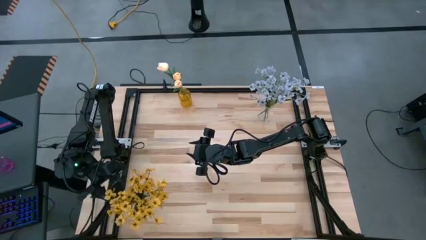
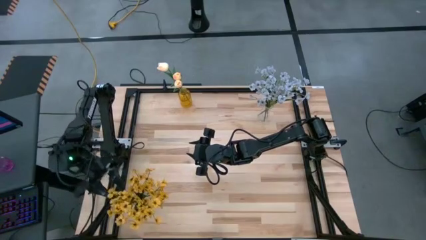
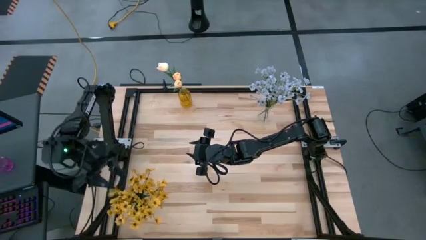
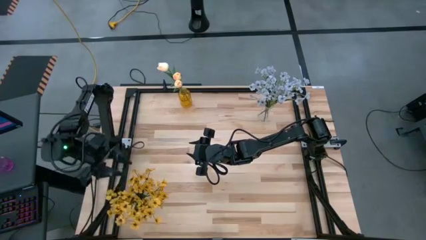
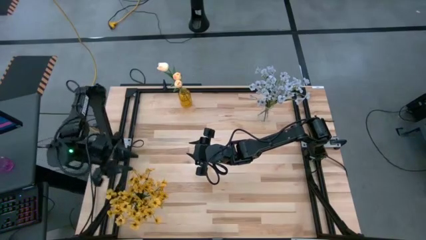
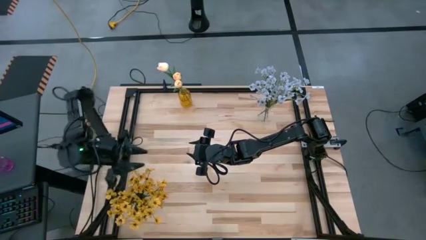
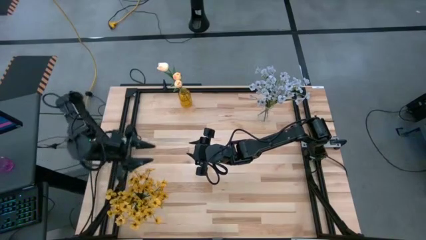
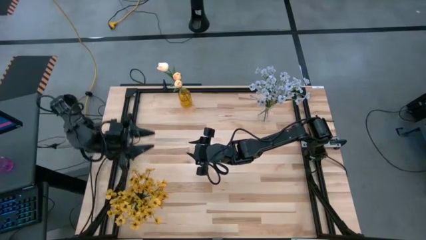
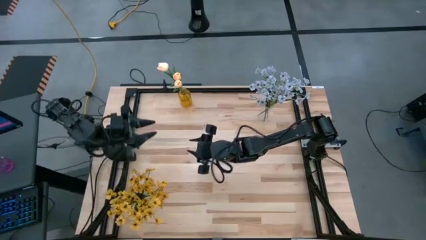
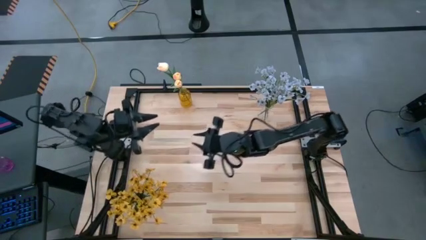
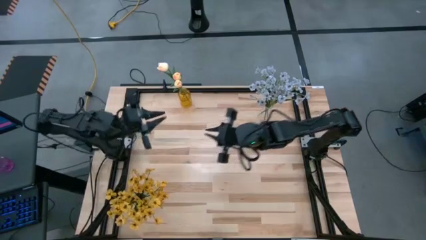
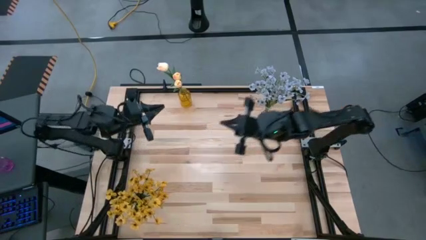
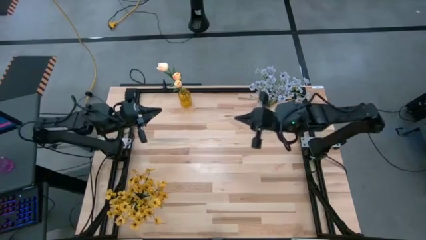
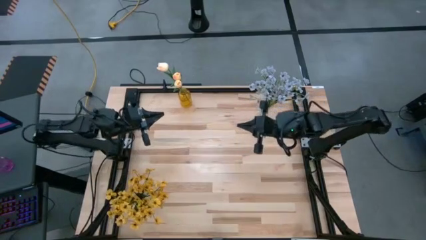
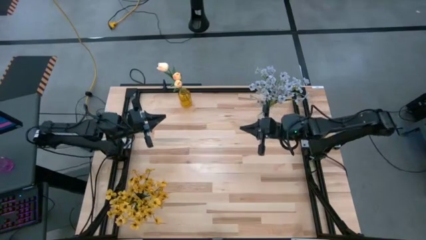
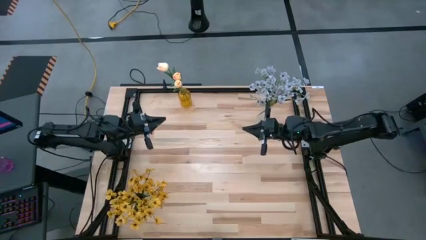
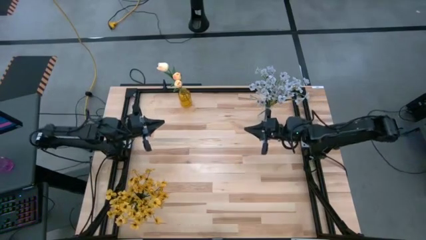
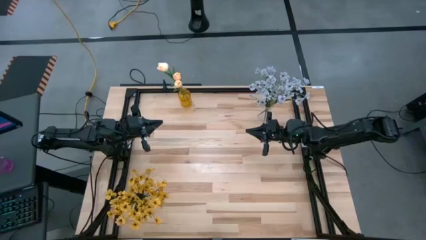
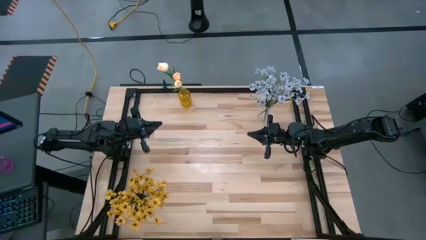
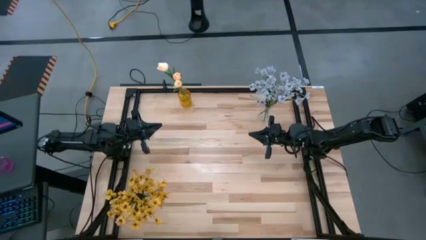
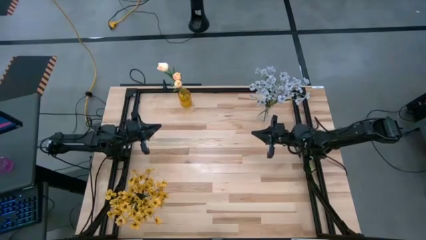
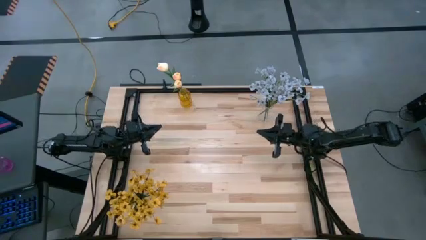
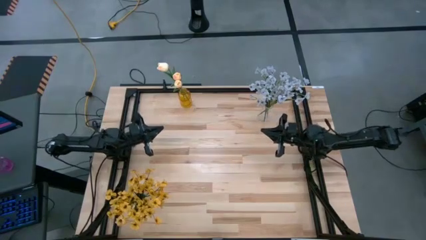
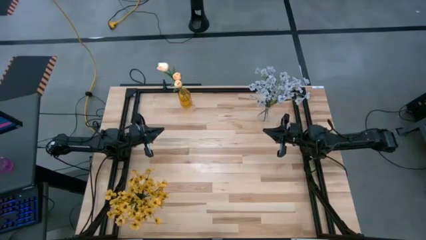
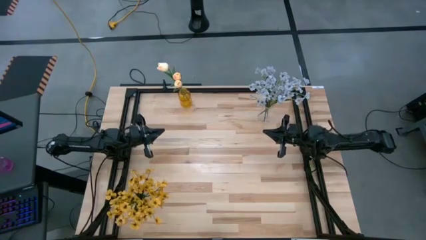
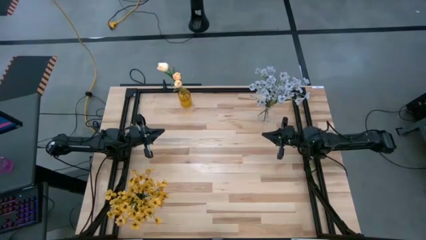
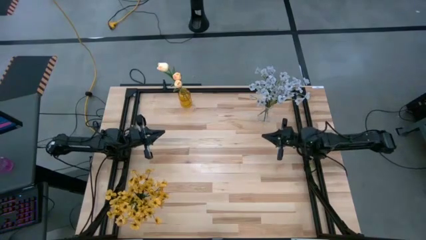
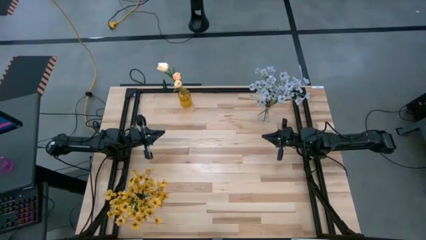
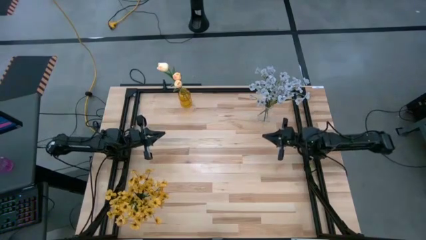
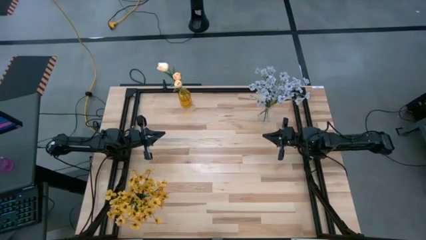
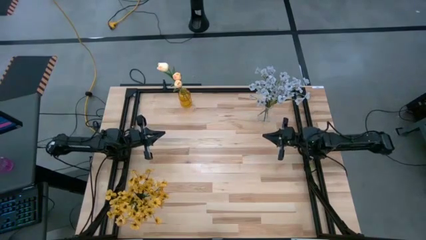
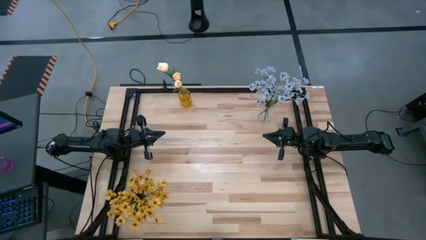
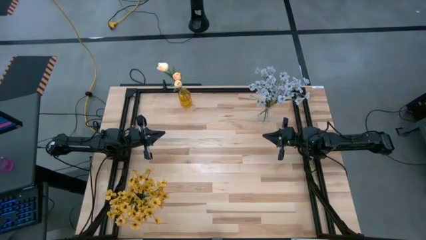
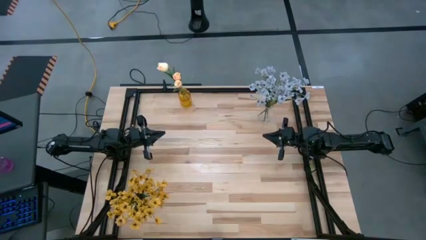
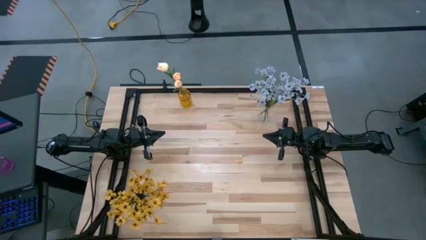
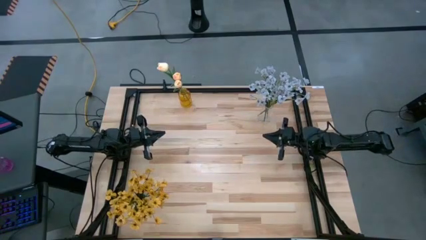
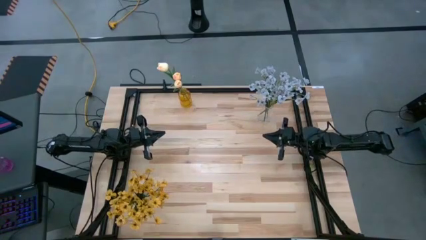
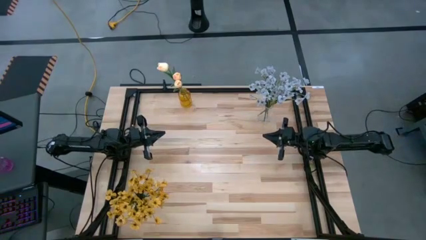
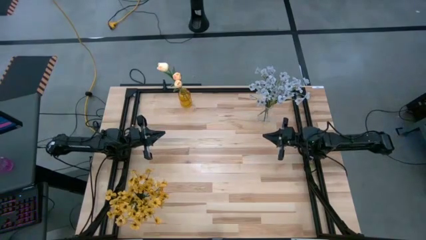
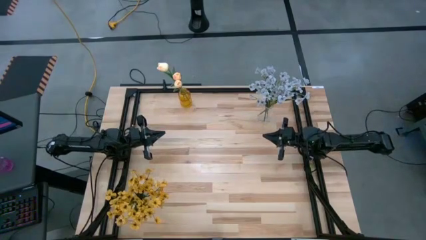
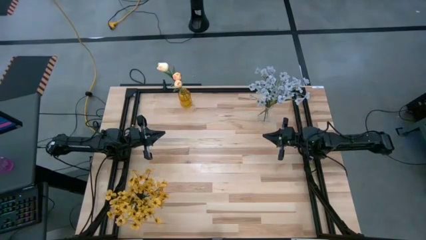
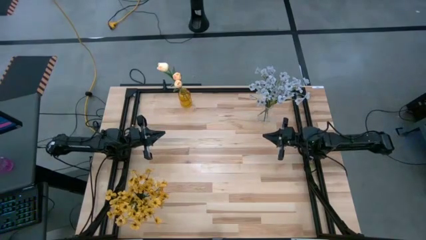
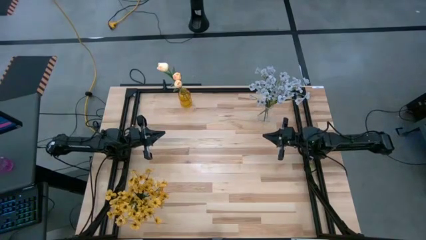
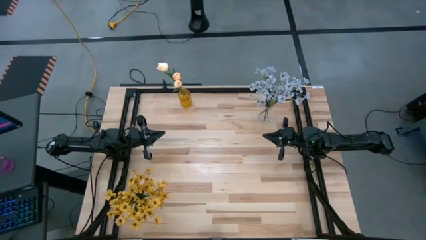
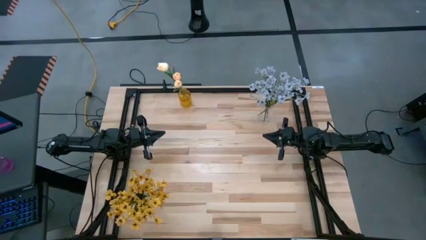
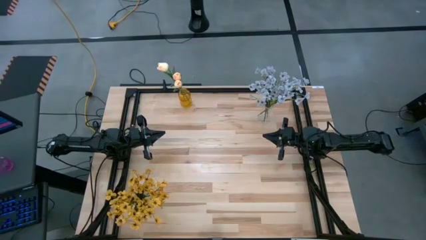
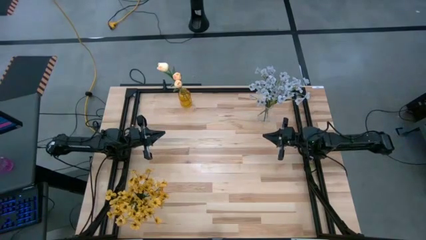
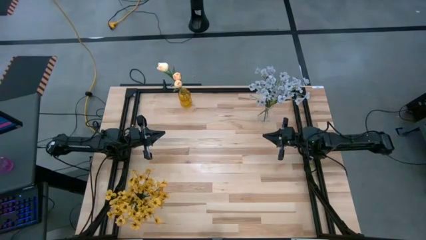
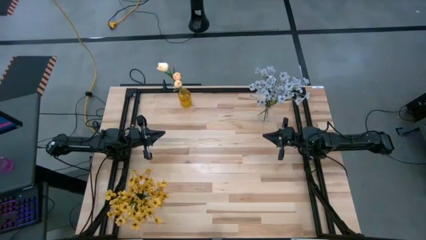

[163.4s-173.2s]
Task: Sort flowers into vase by color
Return to Home Position

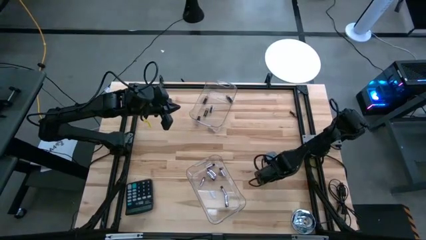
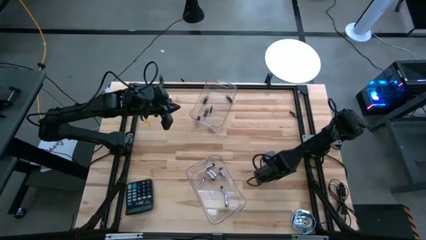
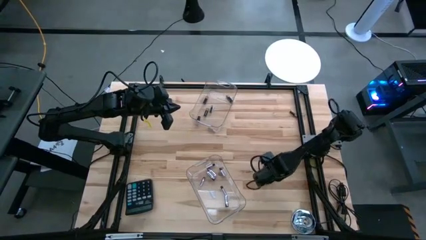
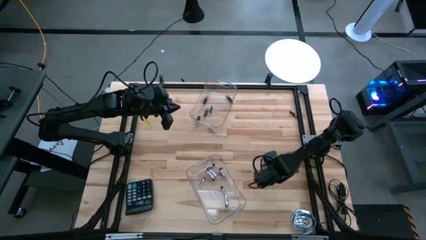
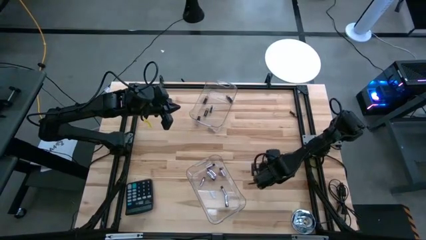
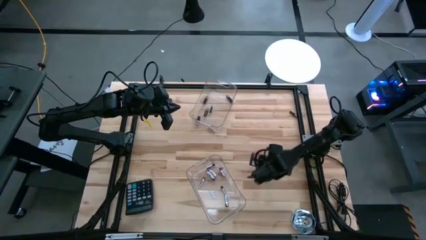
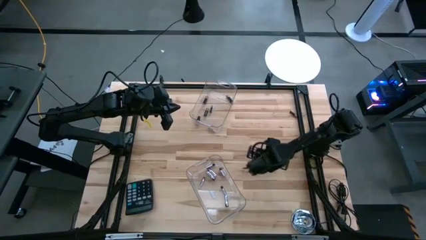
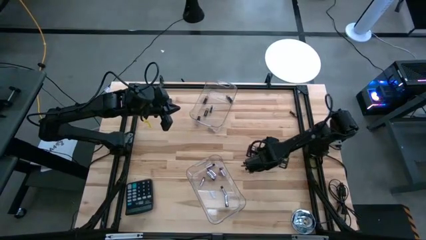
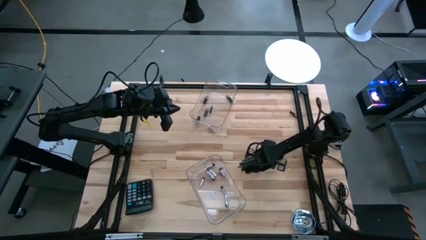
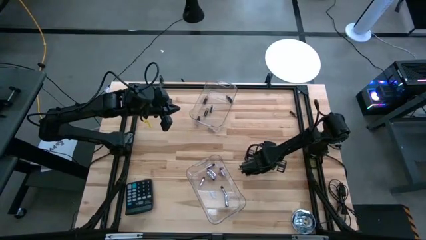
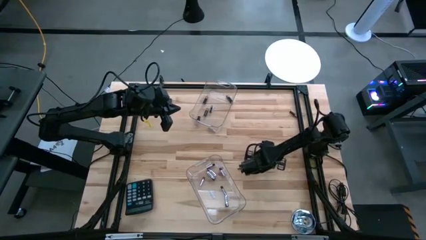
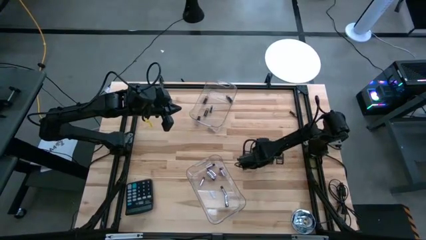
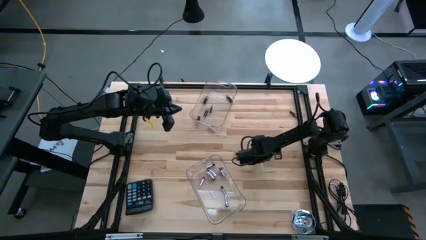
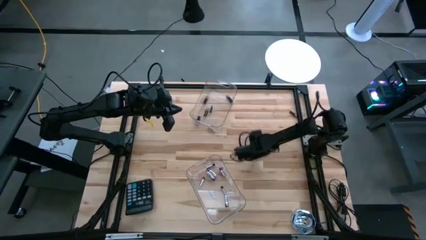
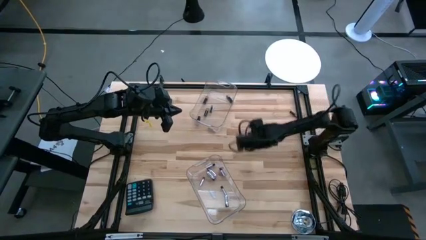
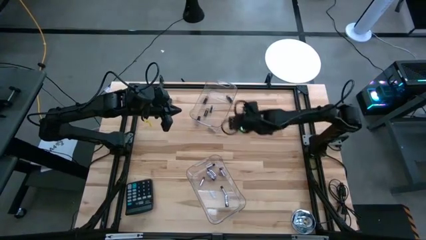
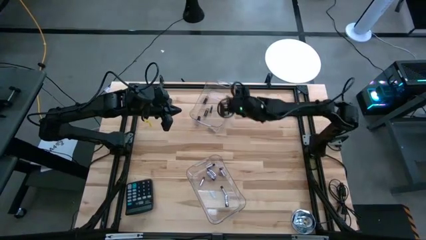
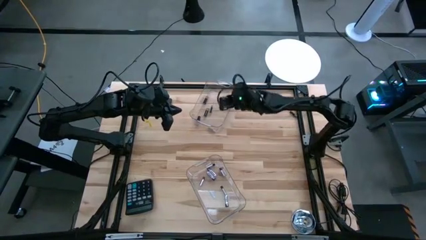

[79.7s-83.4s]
Task: Sort batteries
Put the black battery into the top transparent bin

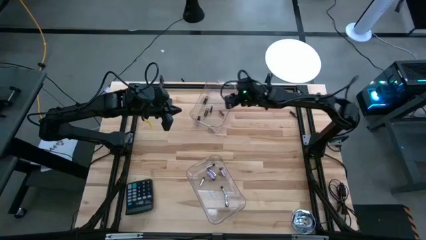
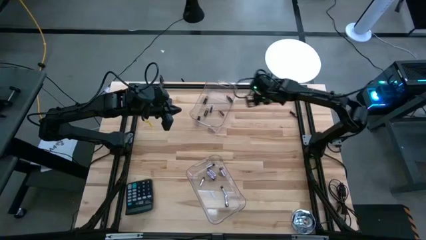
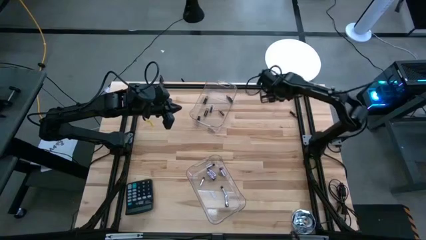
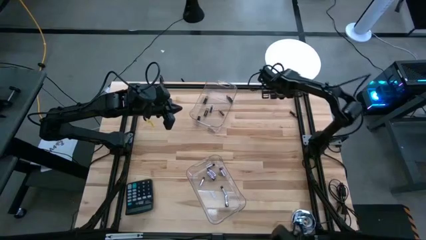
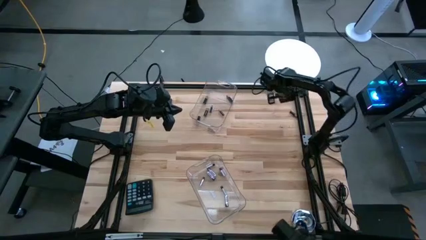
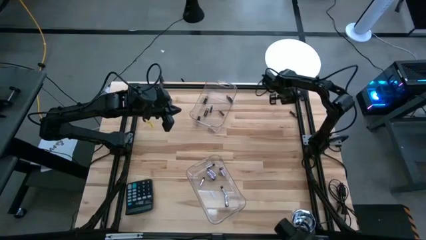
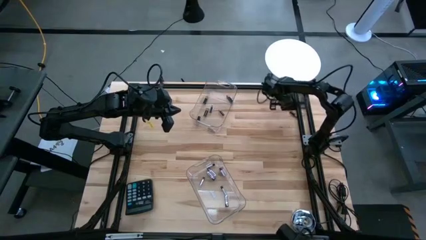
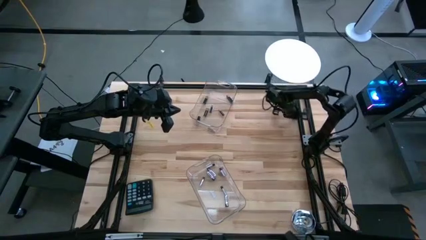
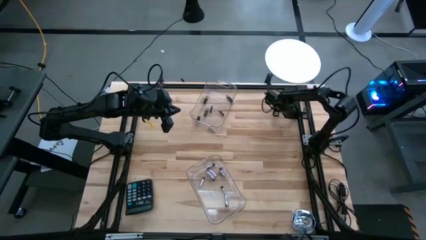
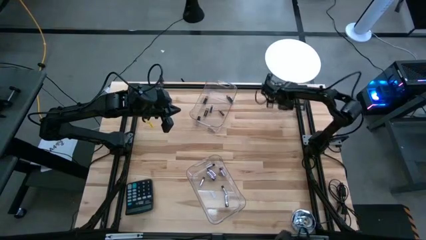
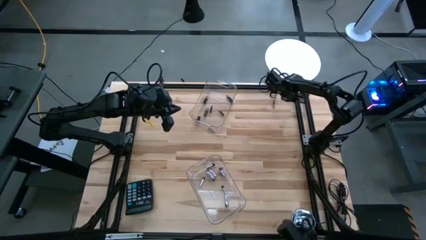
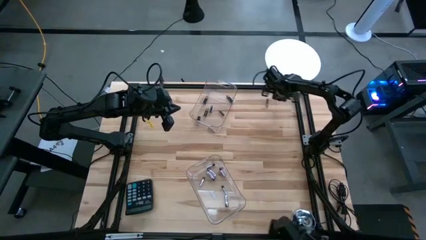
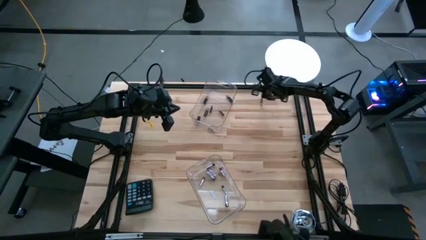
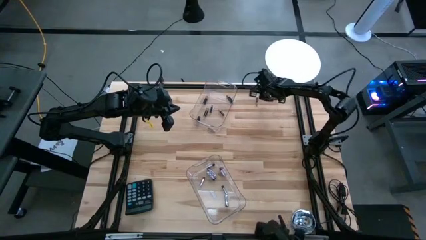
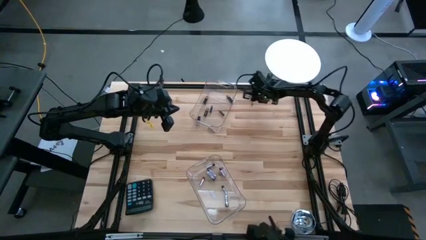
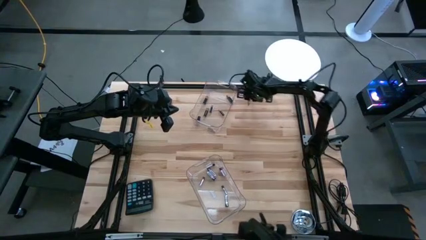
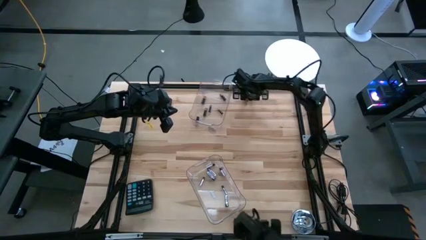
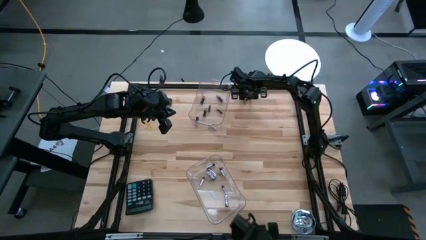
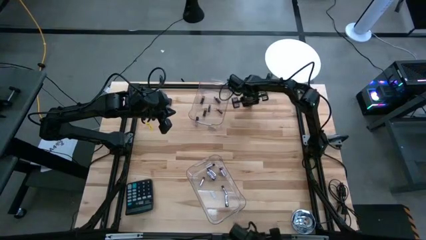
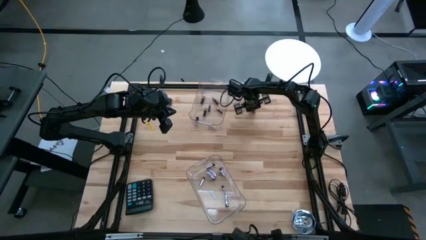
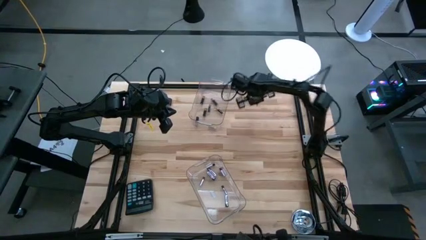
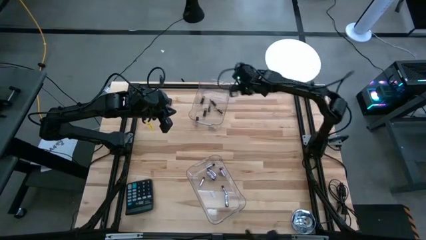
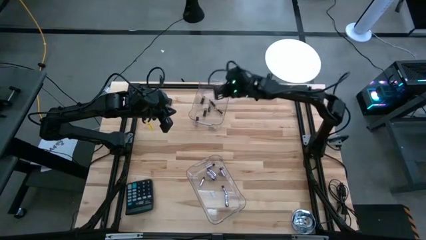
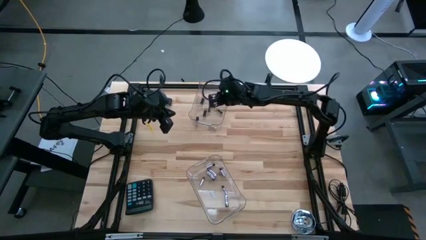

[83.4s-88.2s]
Put the black battery into the top transparent bin
